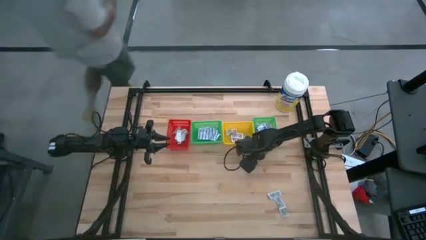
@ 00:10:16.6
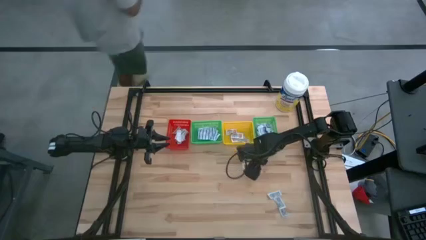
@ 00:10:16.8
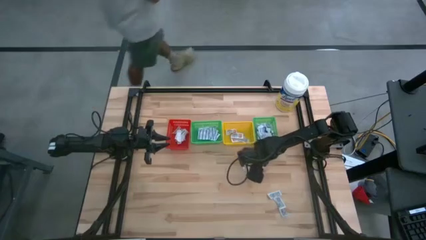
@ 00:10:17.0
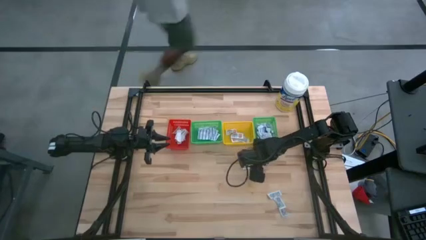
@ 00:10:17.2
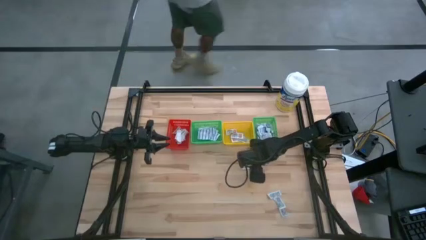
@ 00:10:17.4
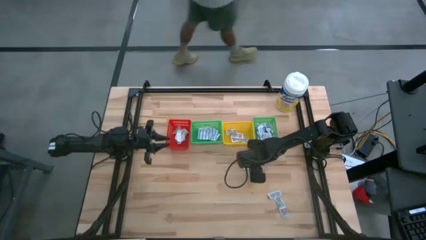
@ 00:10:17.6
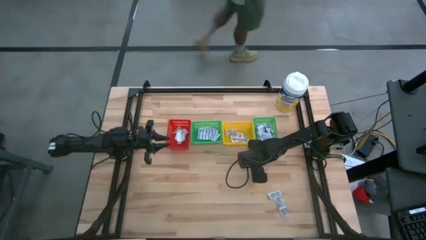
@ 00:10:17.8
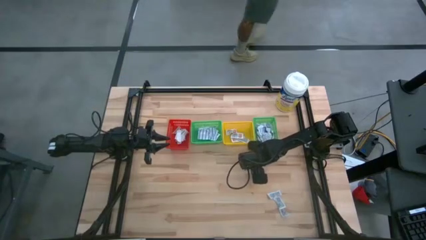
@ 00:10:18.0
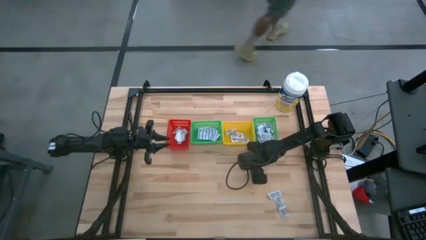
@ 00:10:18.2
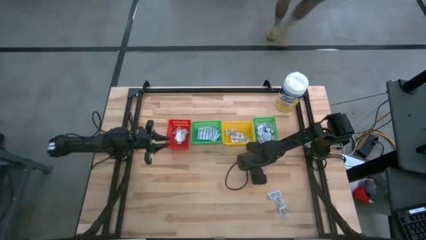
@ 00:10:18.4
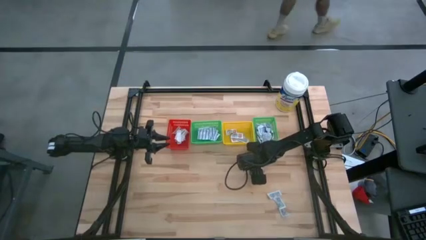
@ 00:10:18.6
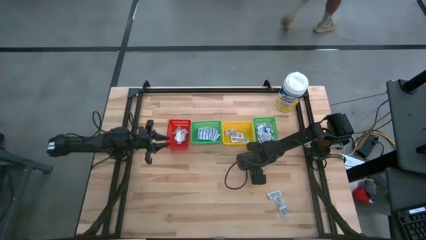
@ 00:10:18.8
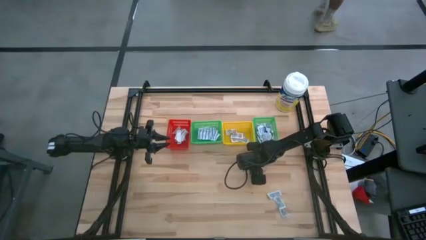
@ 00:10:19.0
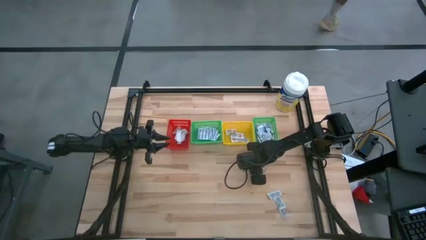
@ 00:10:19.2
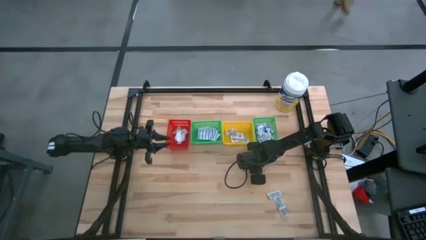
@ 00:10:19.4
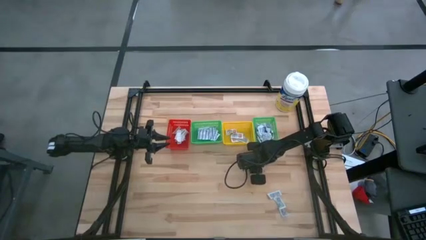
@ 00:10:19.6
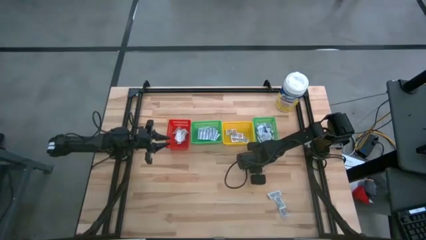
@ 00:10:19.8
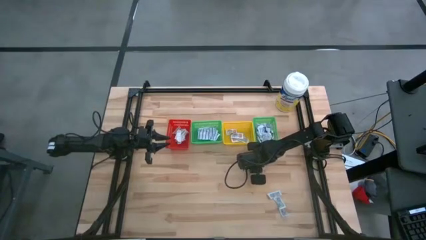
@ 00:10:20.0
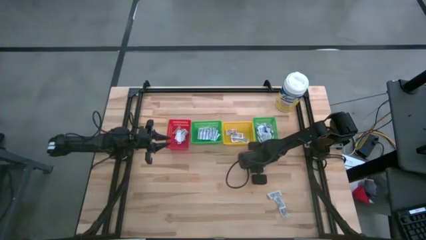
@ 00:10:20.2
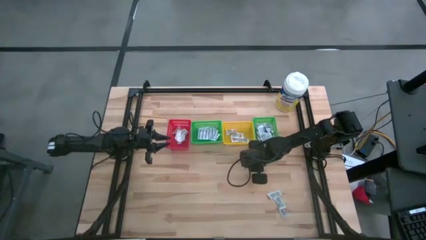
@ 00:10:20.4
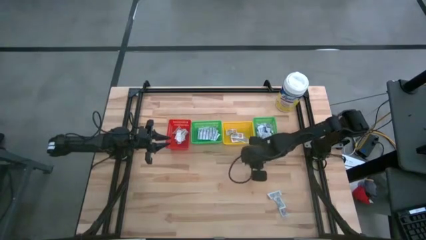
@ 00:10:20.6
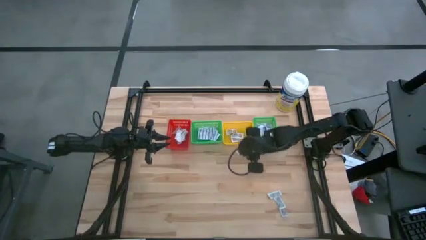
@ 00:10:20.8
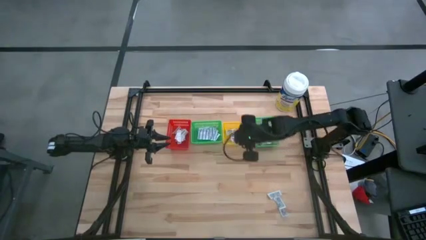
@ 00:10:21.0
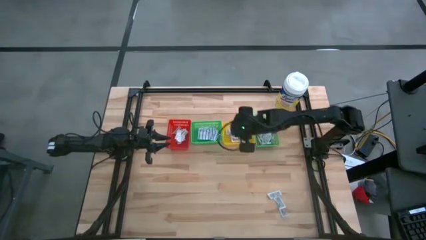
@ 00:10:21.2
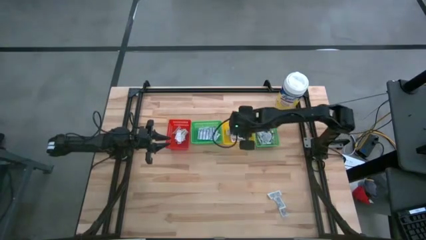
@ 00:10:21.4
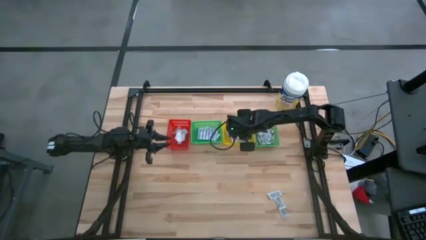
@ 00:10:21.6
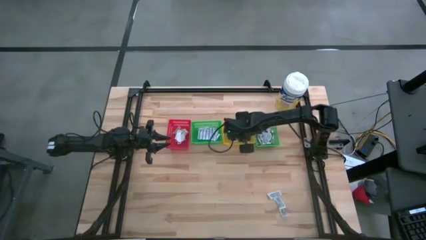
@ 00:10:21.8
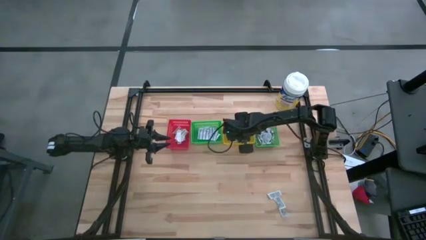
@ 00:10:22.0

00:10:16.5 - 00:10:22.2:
Task: Pick & Place First Aid Supplies
Put the orange ointment pack into the yellow bin

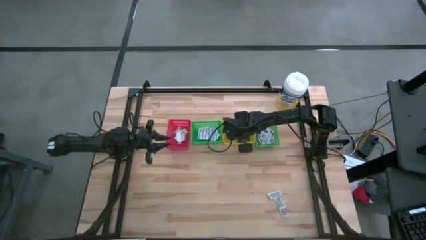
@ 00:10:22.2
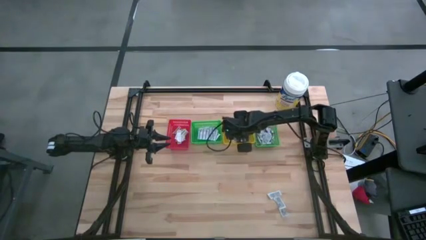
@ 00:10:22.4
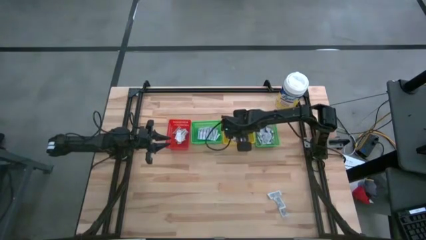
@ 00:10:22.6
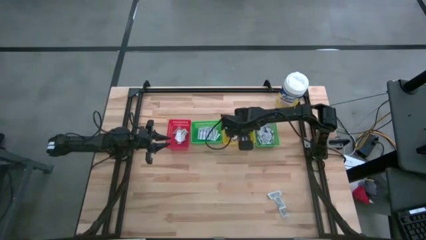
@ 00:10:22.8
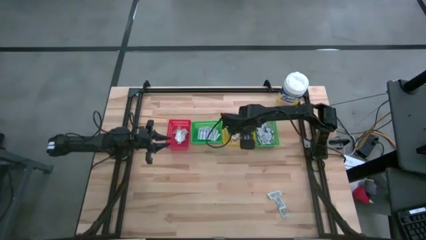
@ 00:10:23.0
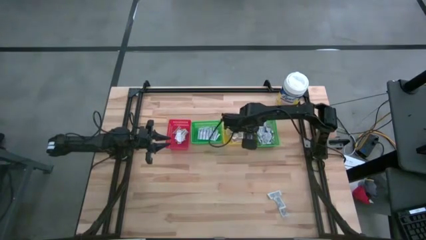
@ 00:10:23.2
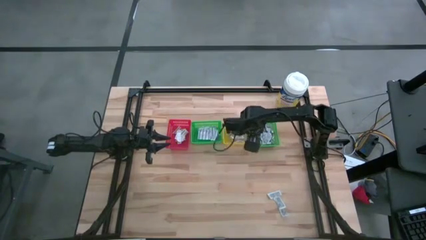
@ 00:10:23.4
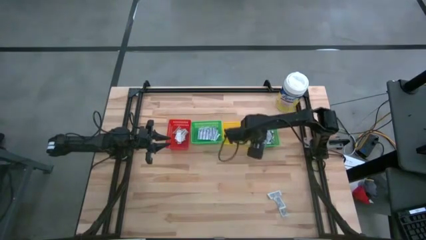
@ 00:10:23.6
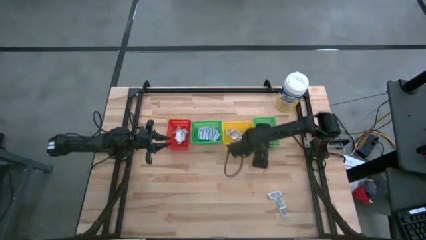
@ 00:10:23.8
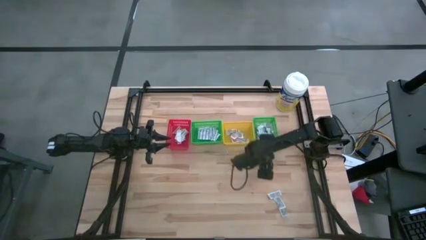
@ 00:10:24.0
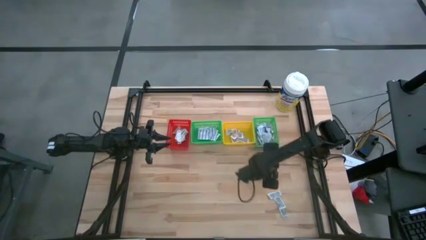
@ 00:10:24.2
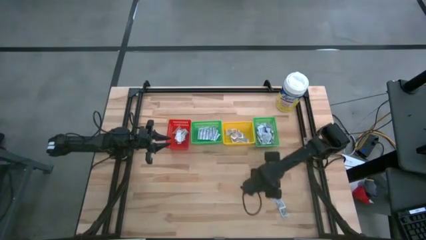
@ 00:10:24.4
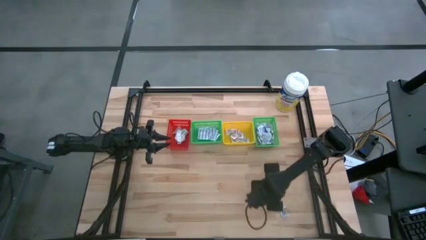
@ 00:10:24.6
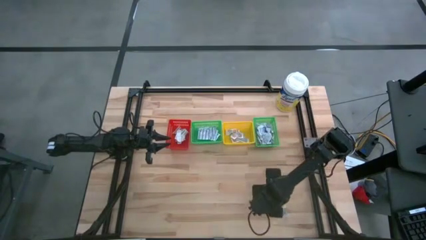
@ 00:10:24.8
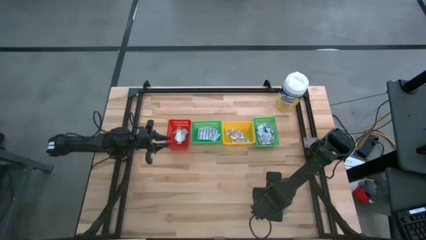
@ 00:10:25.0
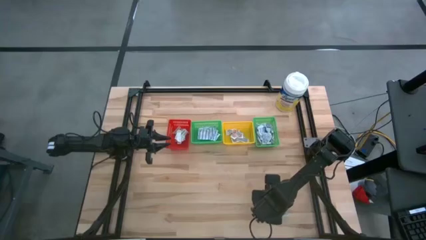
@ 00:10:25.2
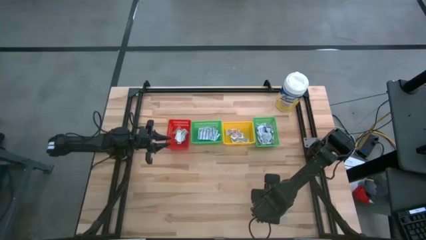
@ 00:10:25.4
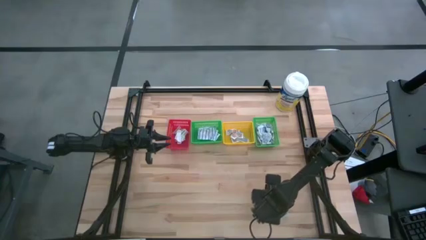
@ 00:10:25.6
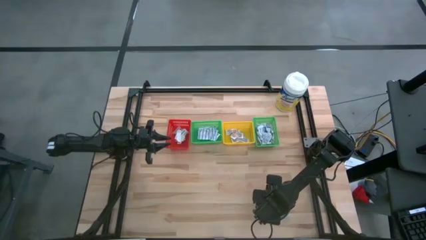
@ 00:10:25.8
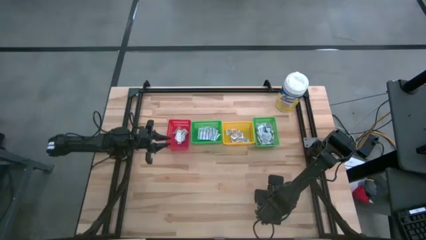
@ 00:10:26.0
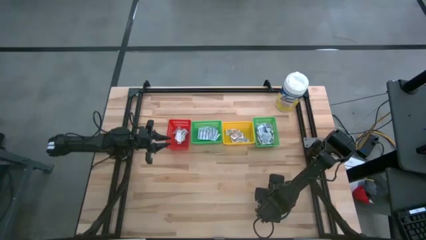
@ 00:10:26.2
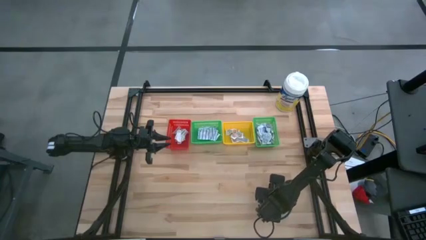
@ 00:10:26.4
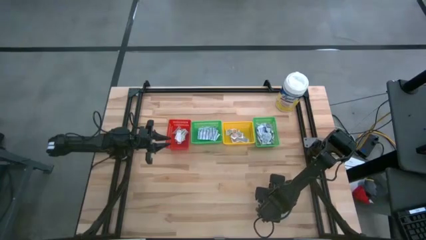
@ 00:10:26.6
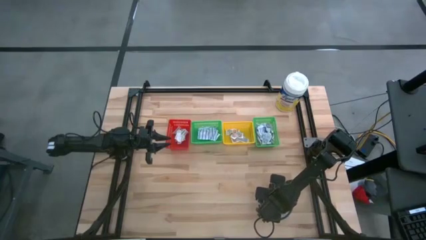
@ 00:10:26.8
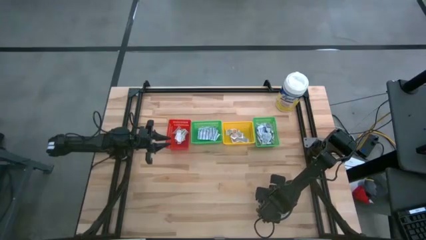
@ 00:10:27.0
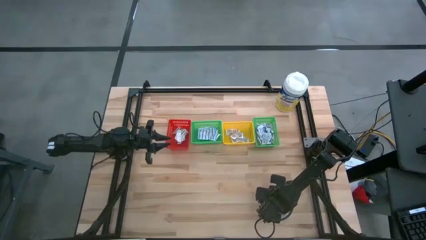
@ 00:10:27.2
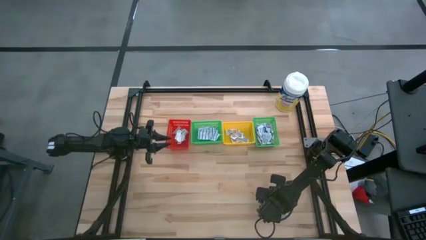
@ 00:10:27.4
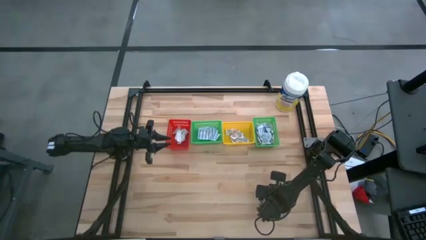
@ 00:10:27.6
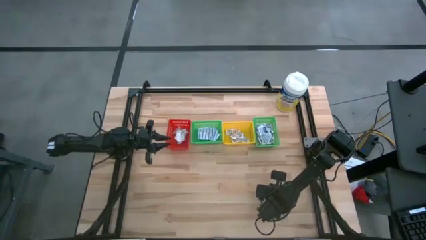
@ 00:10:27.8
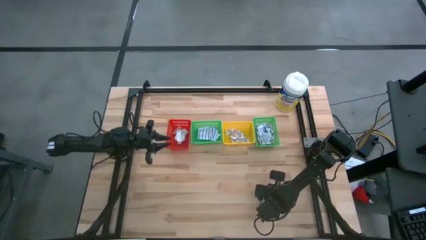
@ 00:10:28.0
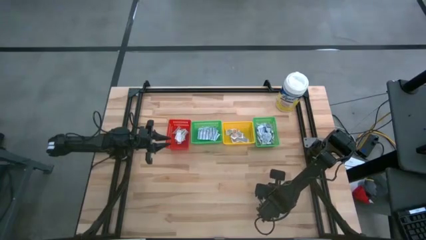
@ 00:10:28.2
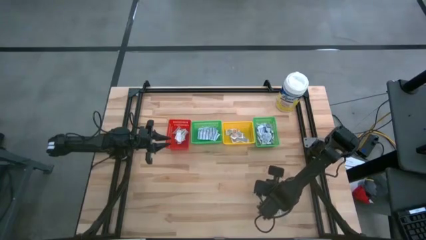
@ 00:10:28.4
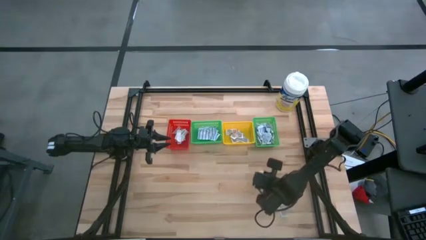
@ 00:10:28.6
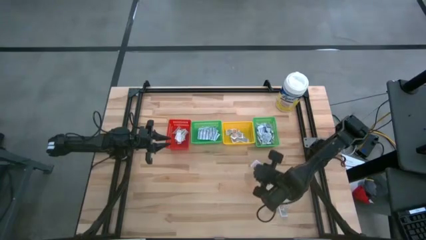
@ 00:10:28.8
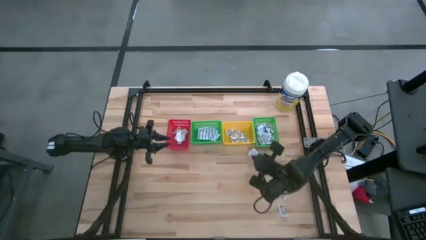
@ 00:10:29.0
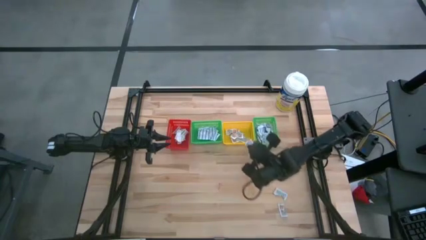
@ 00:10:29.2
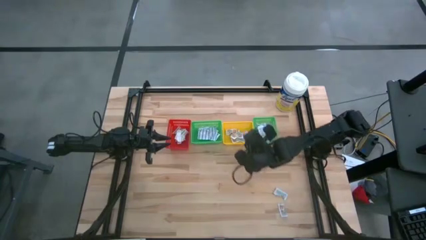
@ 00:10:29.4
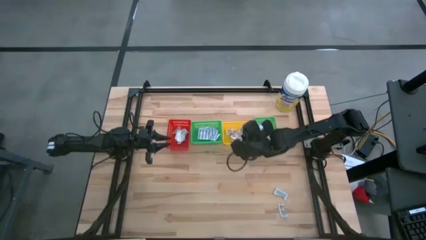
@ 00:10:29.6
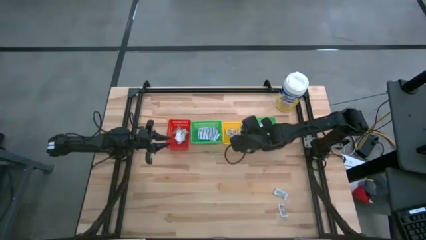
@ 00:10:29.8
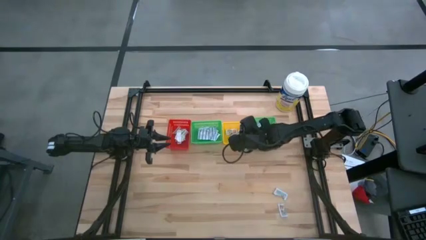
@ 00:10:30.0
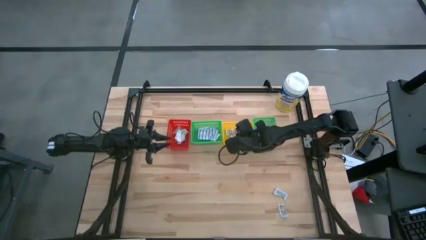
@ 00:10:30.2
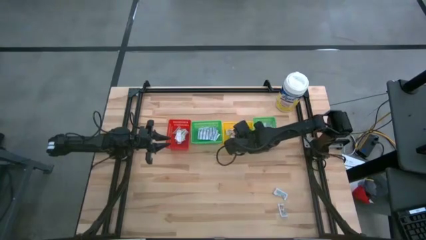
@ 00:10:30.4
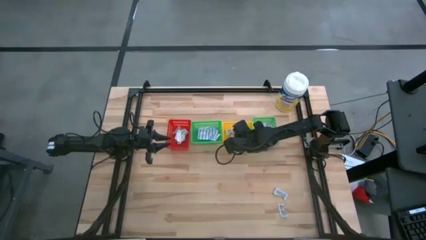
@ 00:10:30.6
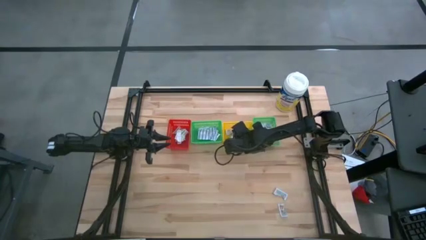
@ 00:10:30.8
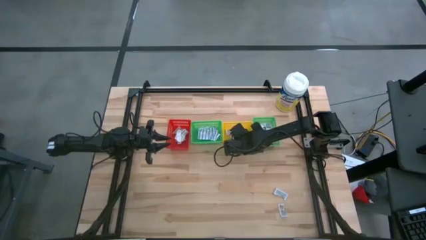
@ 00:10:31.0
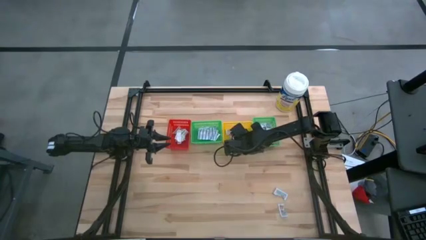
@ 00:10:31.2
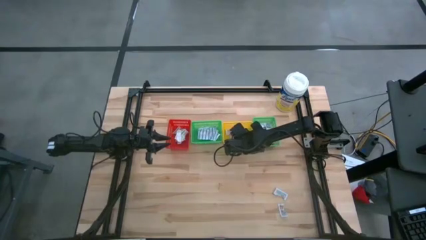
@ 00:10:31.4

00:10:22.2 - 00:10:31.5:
Put the orange ointment pack into the yellow bin
